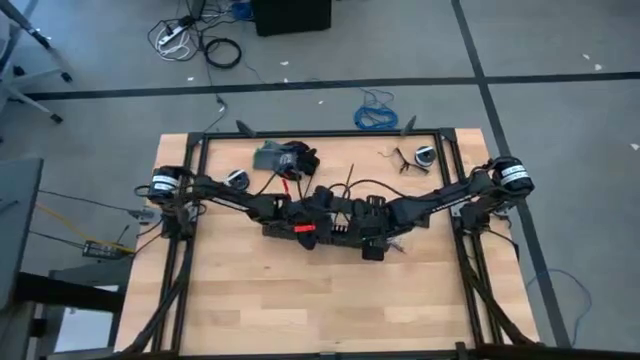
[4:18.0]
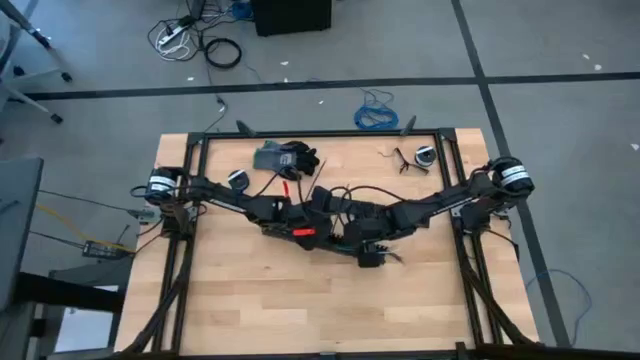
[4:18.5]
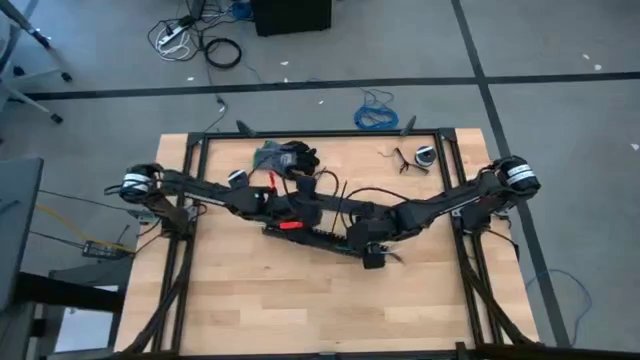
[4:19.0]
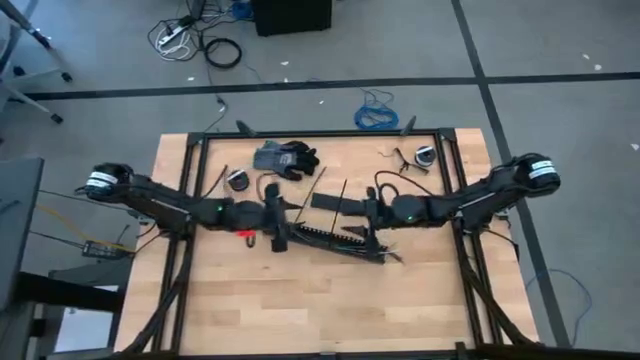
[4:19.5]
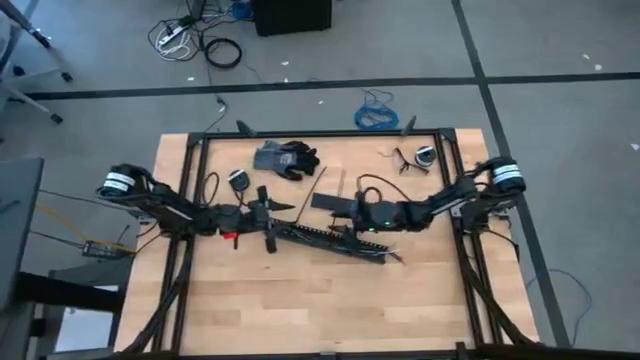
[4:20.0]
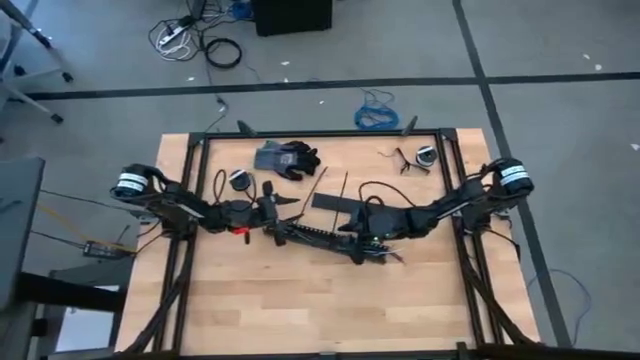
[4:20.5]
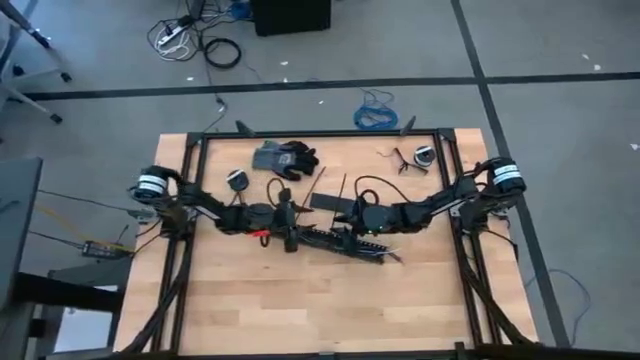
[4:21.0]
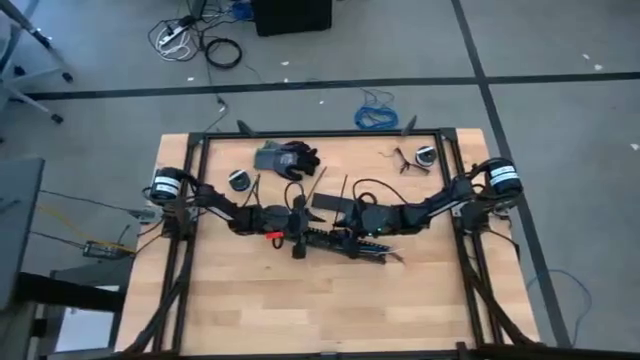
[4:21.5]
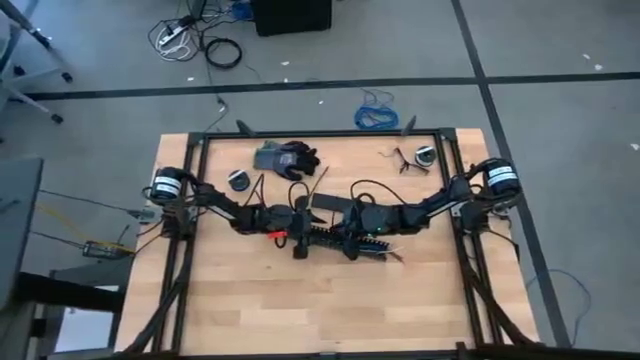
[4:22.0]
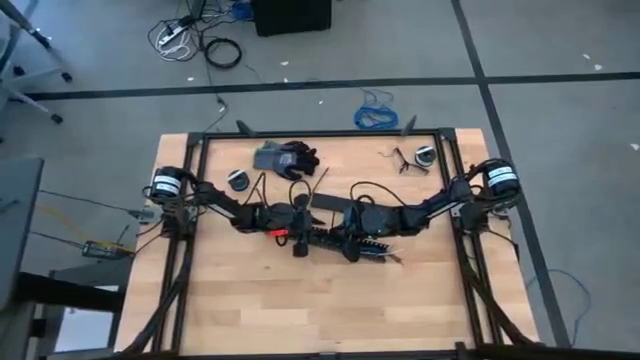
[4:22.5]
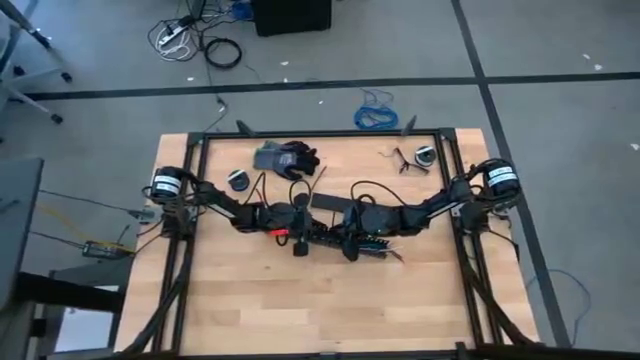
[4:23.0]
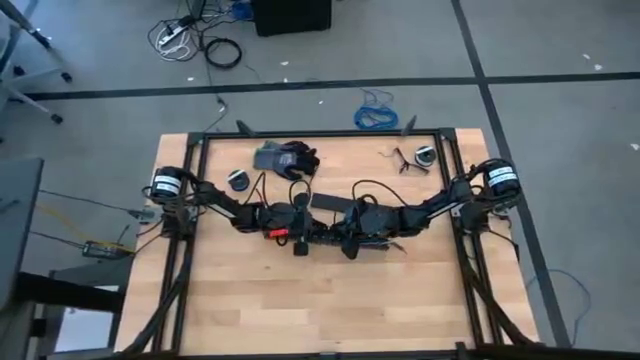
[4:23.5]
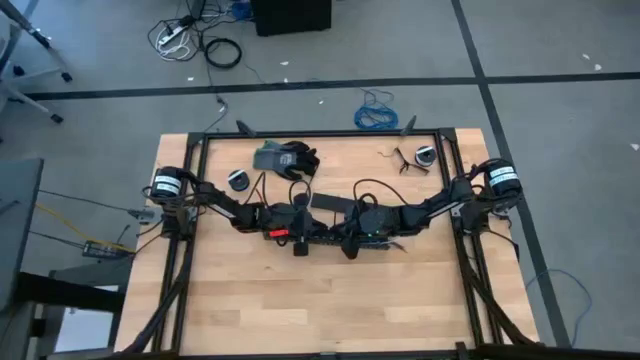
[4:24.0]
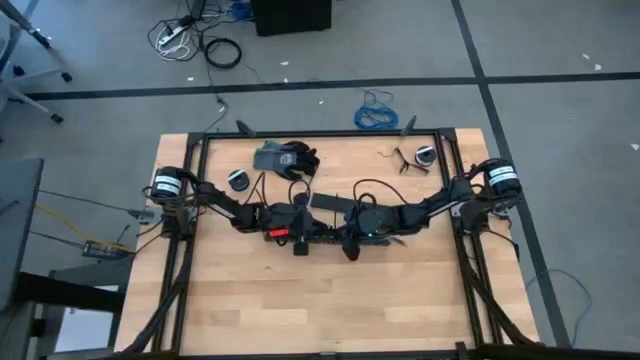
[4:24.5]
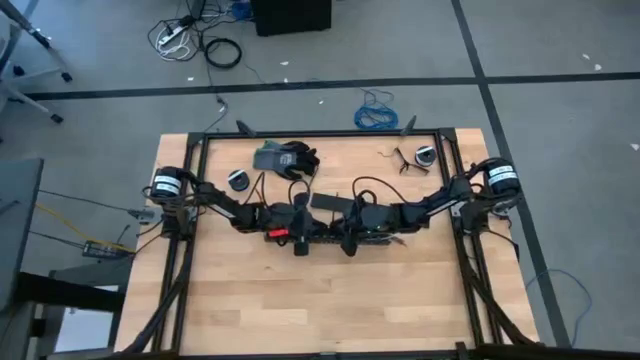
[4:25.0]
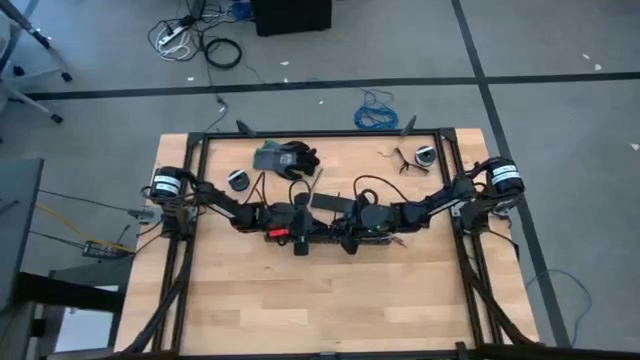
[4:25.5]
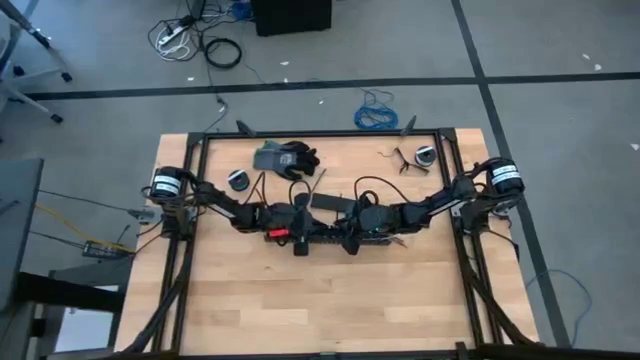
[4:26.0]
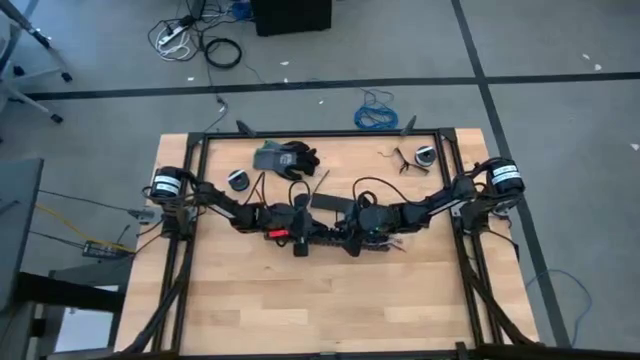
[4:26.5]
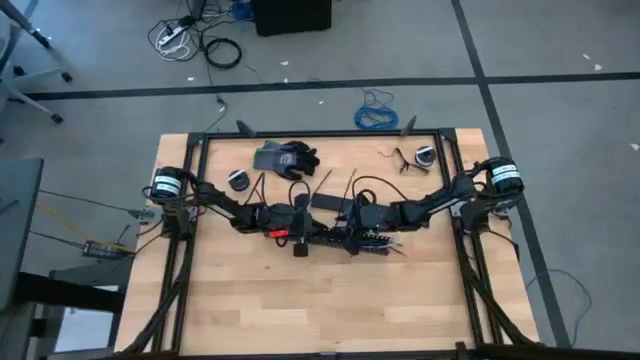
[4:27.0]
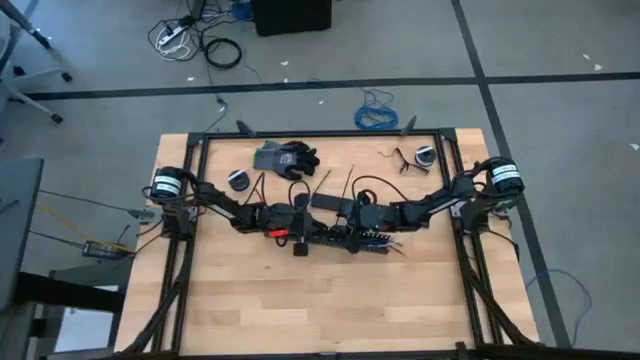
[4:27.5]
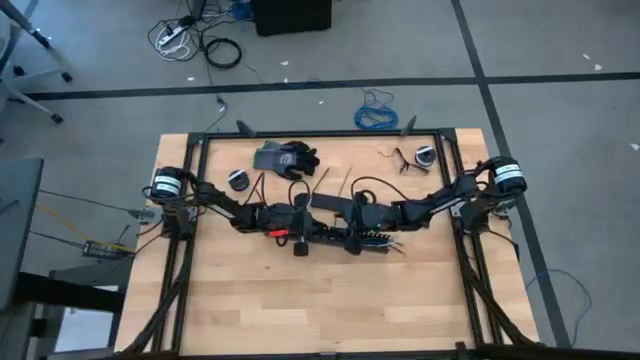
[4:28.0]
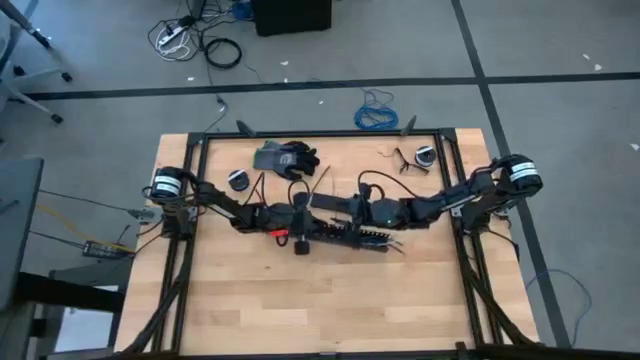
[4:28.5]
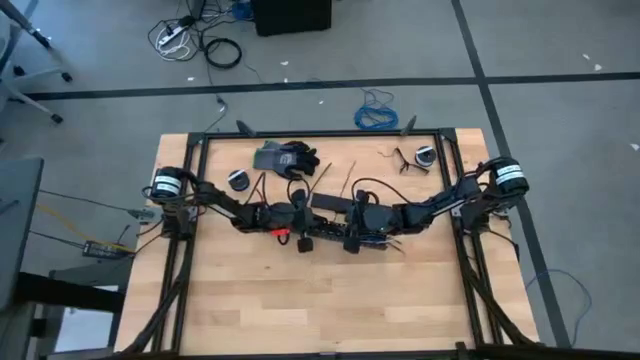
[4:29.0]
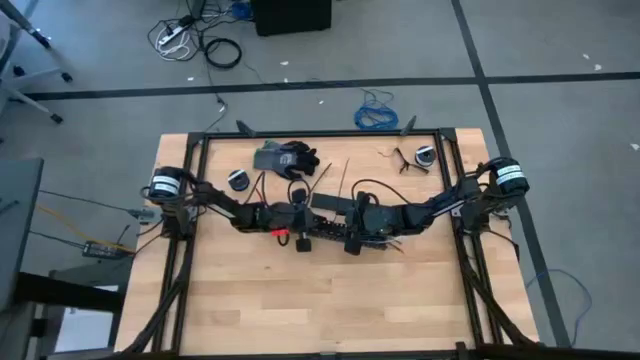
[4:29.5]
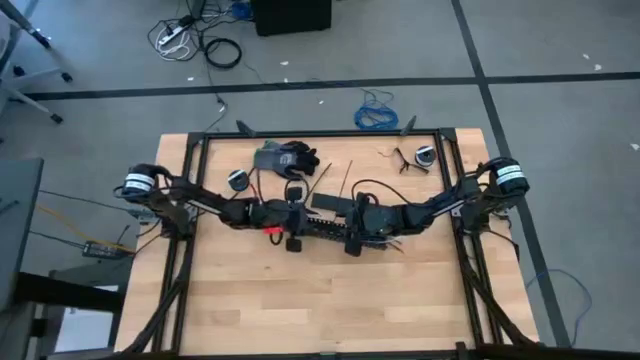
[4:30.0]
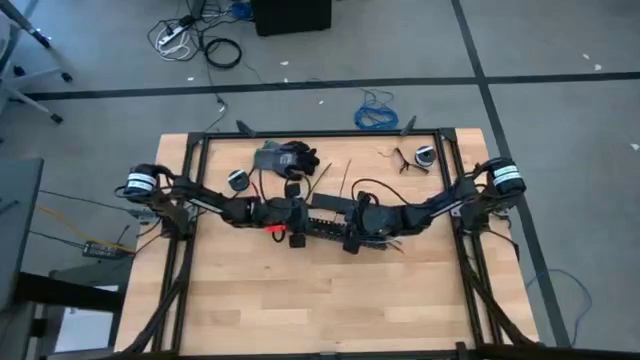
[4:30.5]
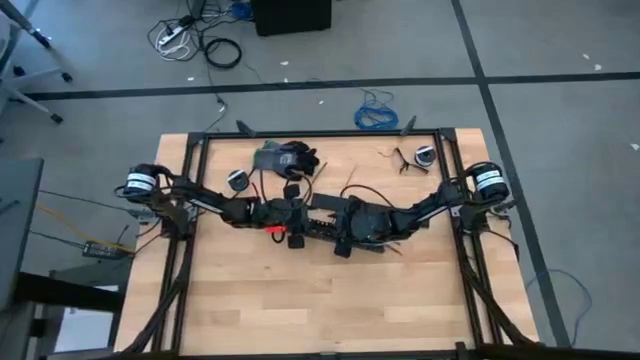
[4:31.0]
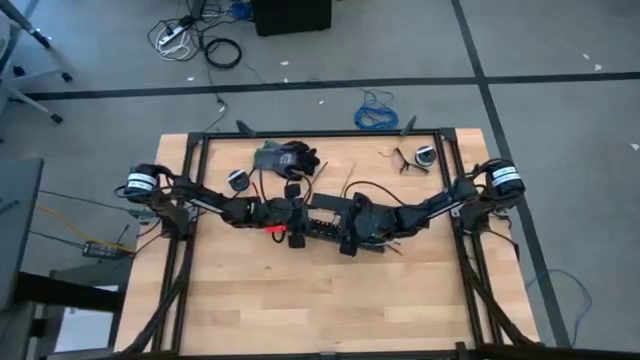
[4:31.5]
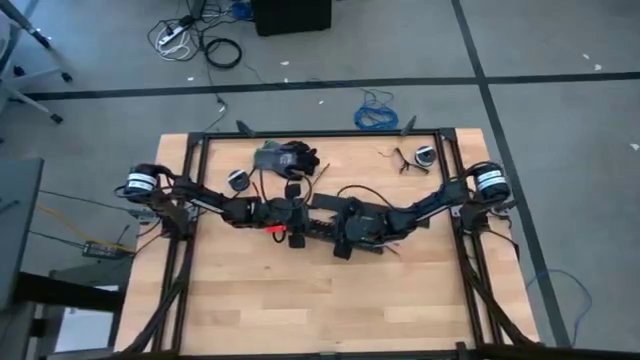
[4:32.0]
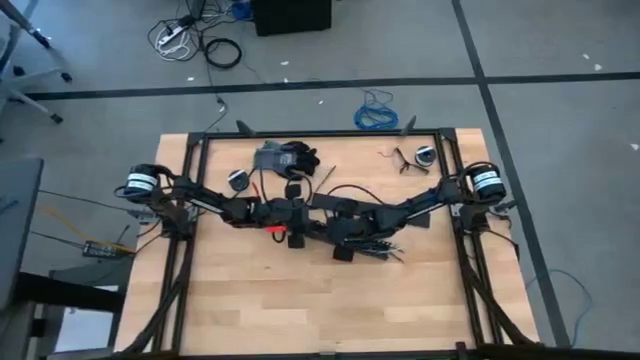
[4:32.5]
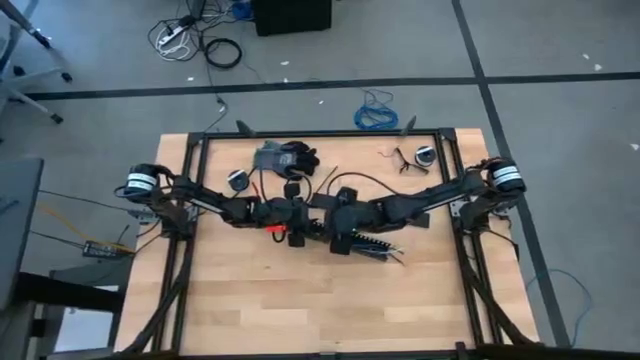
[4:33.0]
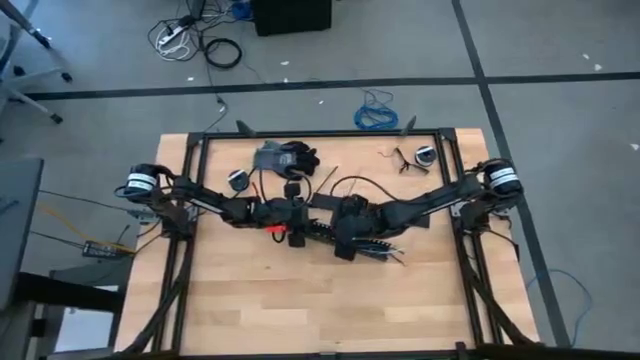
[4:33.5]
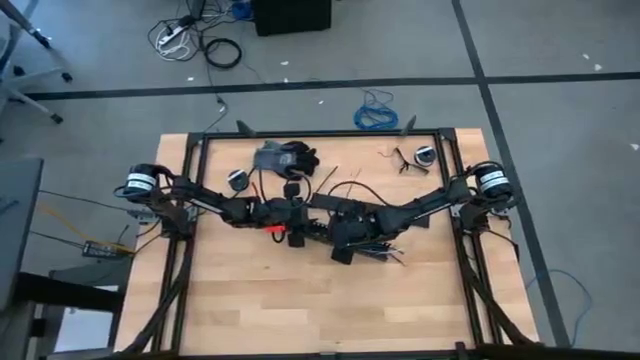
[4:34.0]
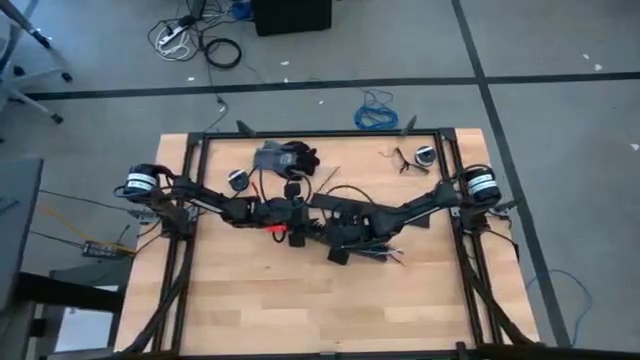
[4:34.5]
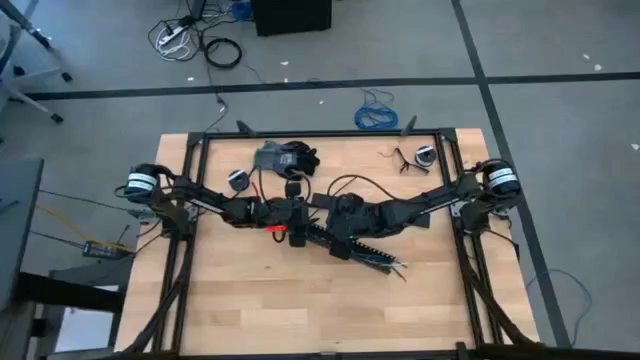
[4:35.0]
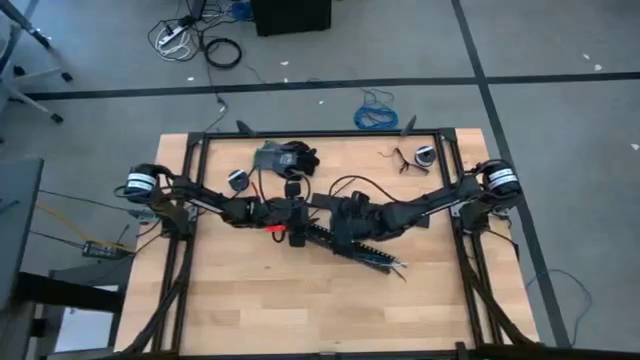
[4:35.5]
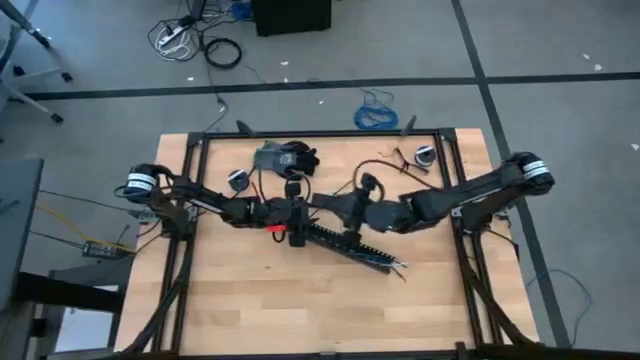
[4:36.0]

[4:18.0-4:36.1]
Task: Ziptie cables
Put the cable wires in the black cable duct

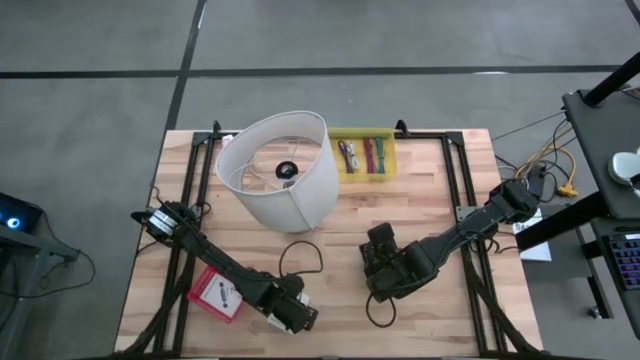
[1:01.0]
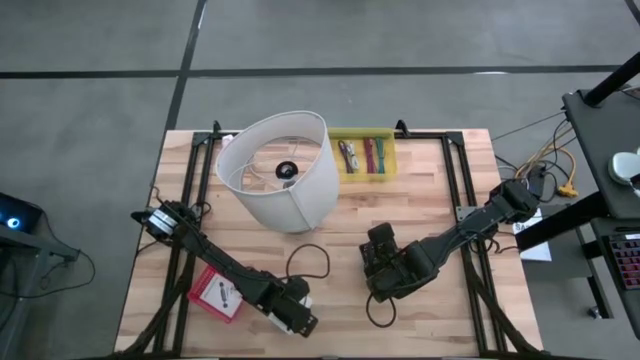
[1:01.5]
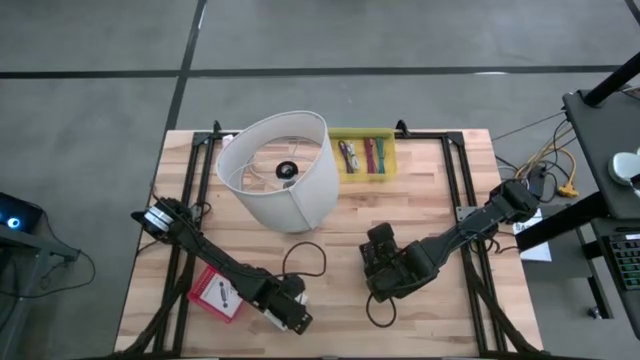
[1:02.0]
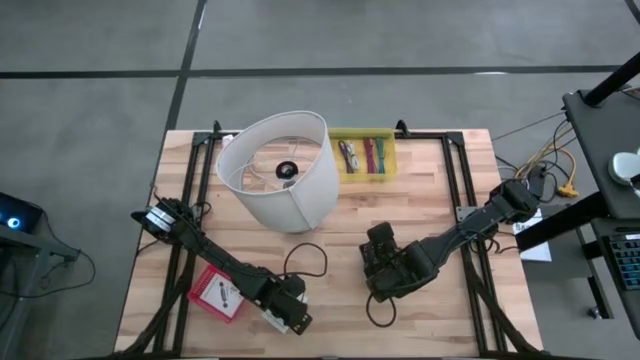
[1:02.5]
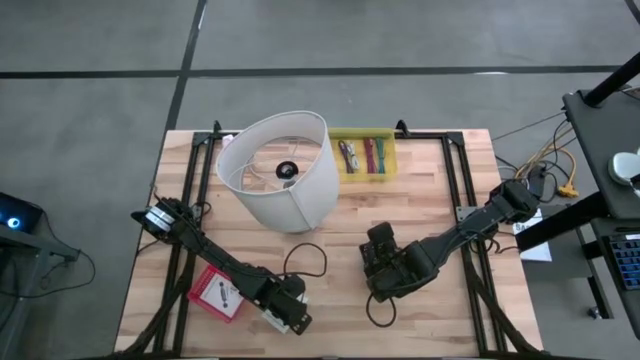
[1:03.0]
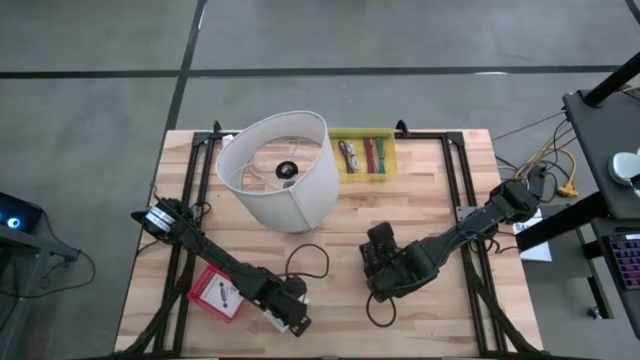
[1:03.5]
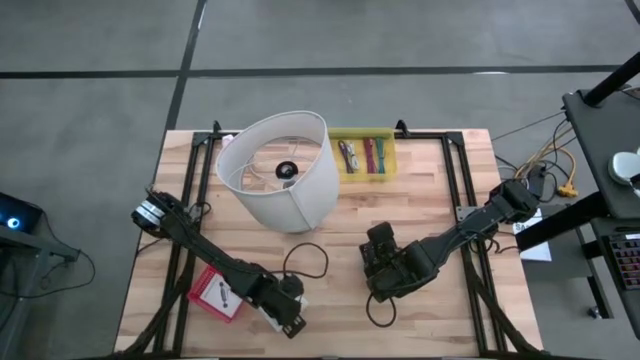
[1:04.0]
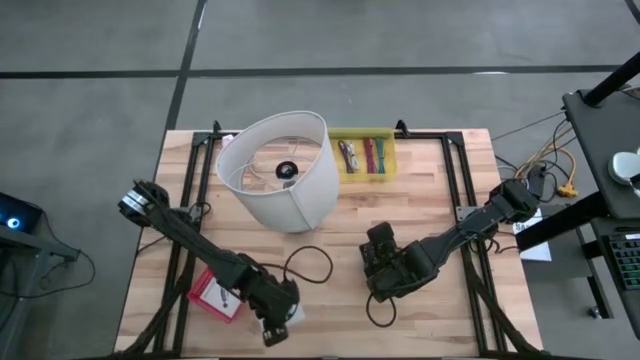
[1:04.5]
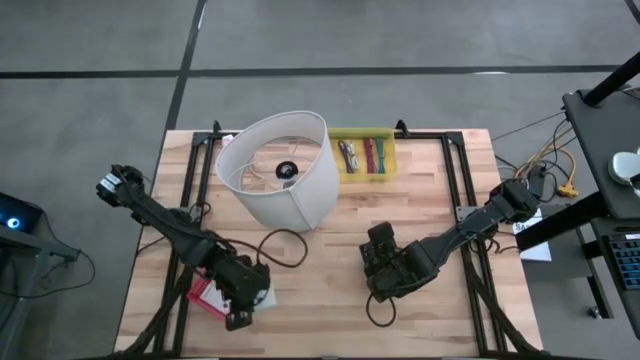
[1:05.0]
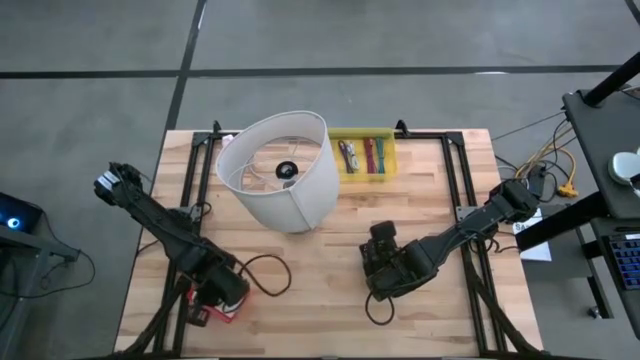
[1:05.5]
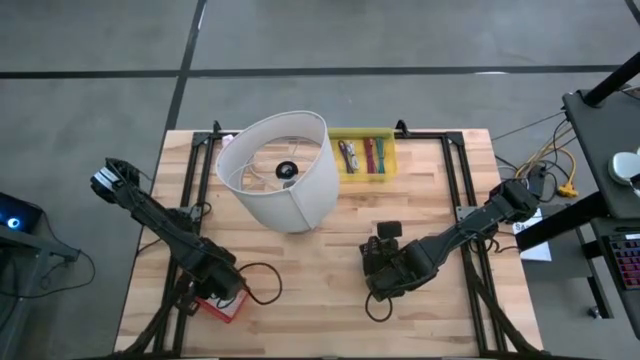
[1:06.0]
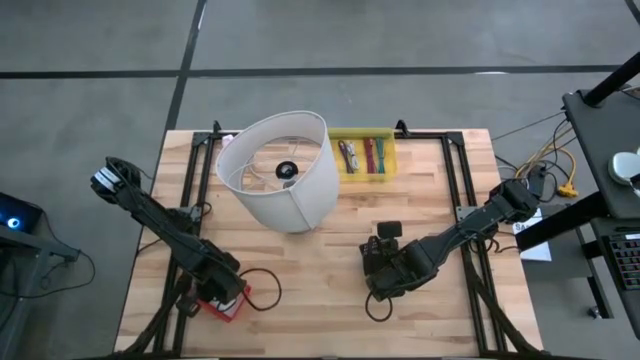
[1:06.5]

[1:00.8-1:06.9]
Task: Pick and place items into bin
Put the white box into the red bin
